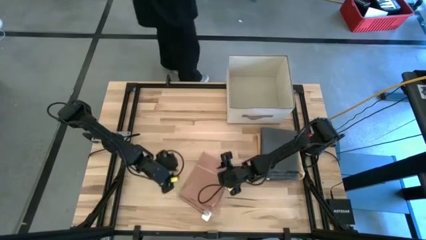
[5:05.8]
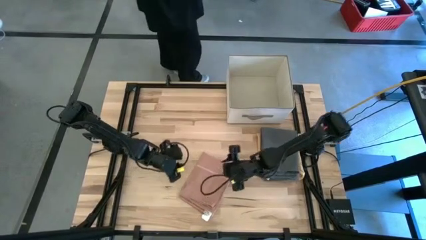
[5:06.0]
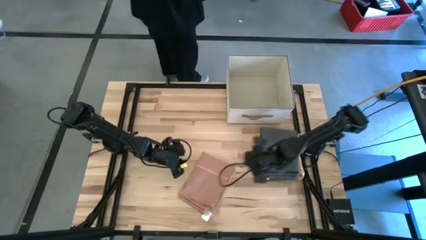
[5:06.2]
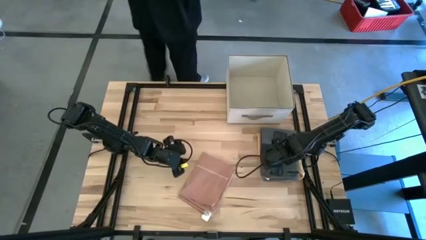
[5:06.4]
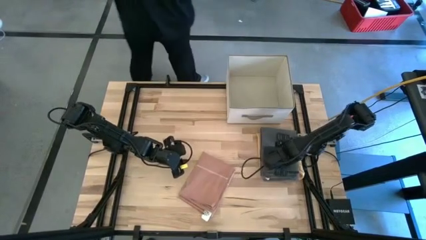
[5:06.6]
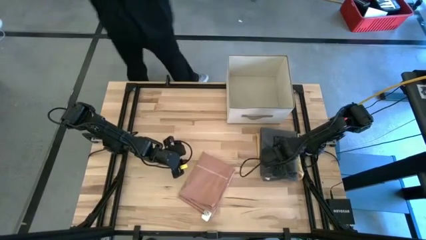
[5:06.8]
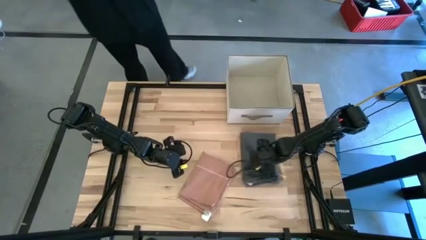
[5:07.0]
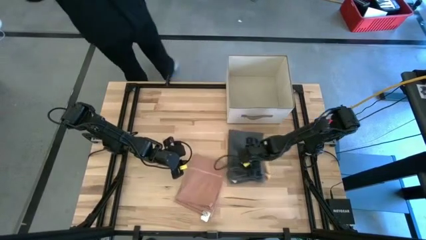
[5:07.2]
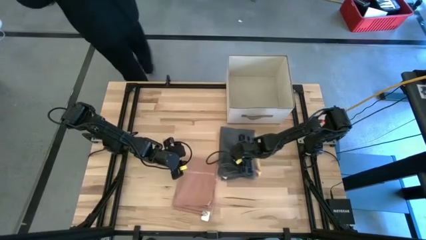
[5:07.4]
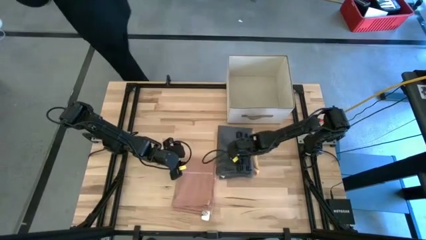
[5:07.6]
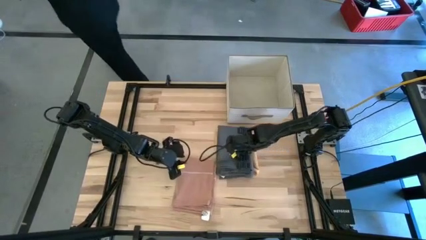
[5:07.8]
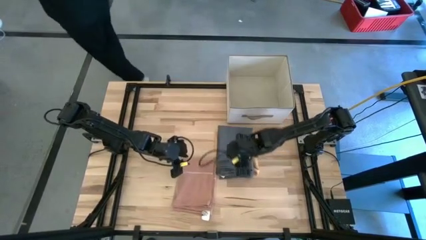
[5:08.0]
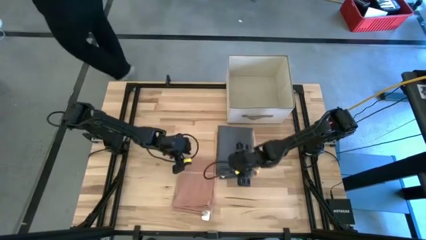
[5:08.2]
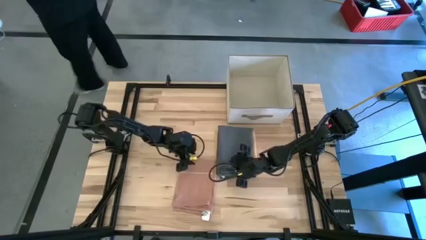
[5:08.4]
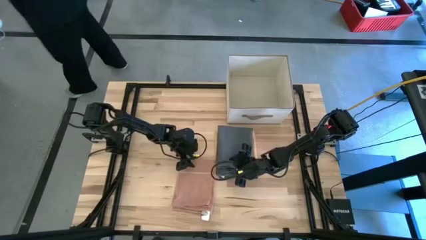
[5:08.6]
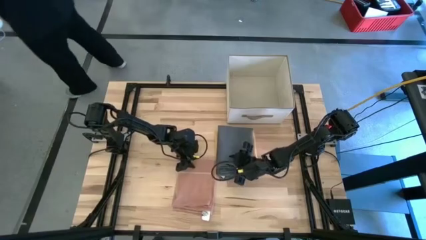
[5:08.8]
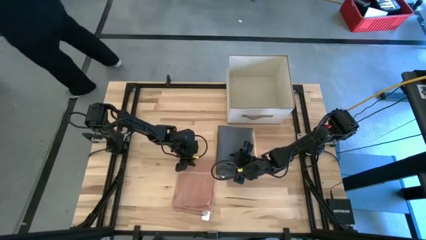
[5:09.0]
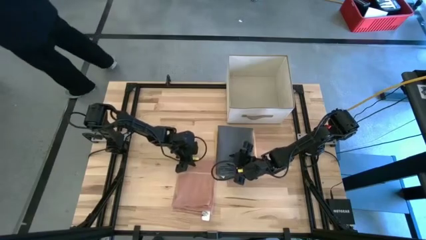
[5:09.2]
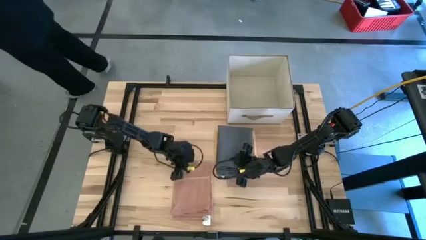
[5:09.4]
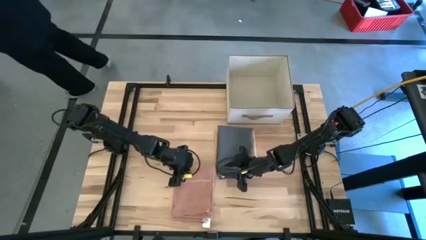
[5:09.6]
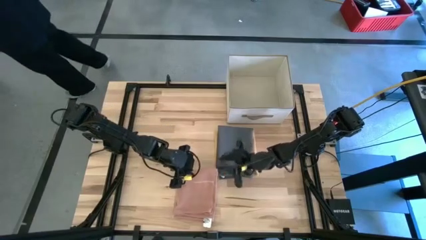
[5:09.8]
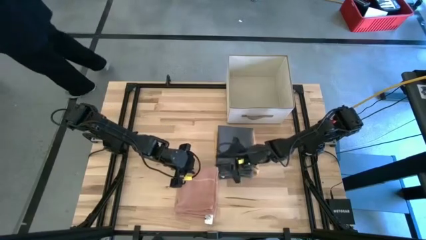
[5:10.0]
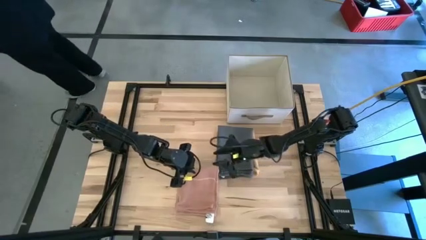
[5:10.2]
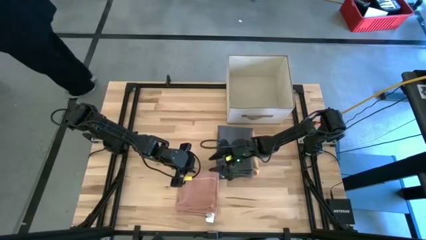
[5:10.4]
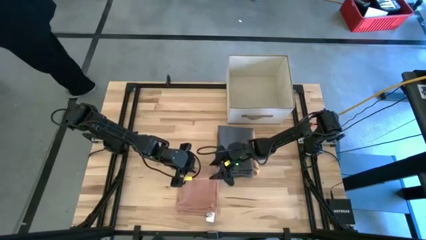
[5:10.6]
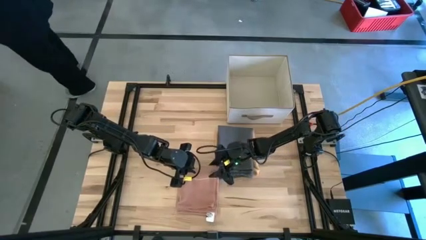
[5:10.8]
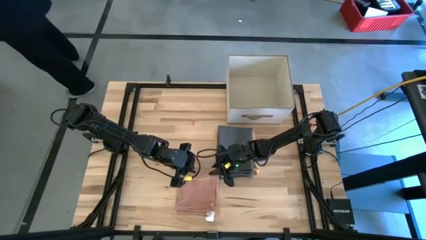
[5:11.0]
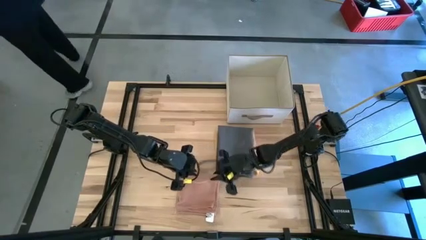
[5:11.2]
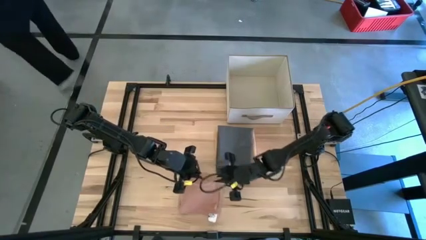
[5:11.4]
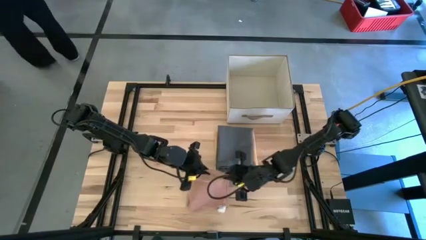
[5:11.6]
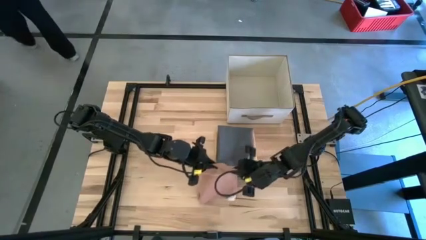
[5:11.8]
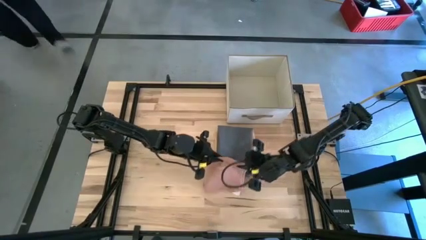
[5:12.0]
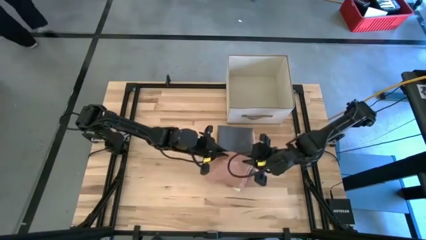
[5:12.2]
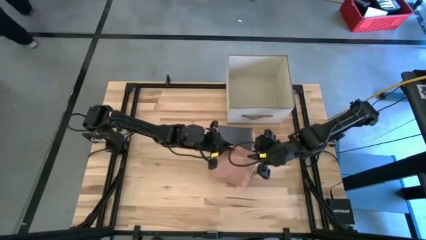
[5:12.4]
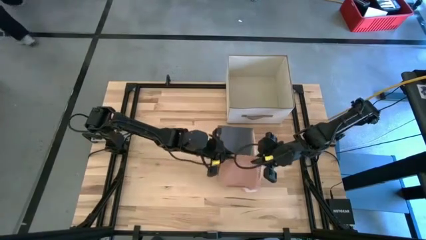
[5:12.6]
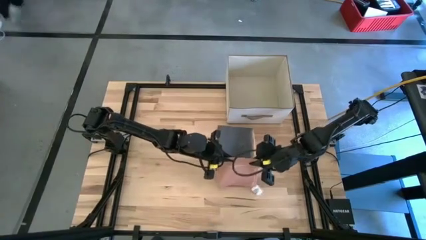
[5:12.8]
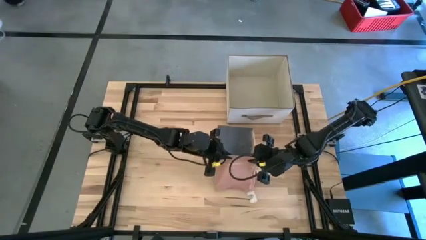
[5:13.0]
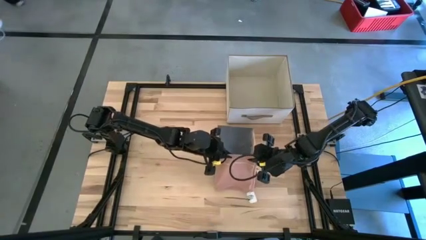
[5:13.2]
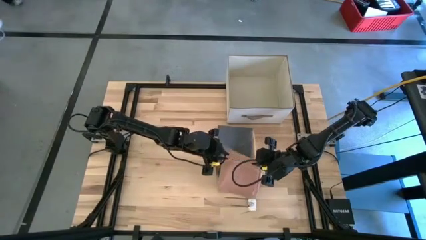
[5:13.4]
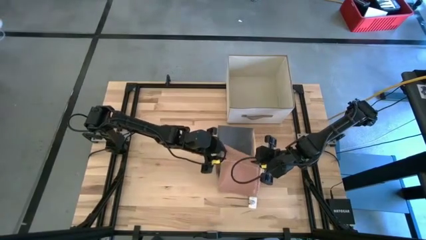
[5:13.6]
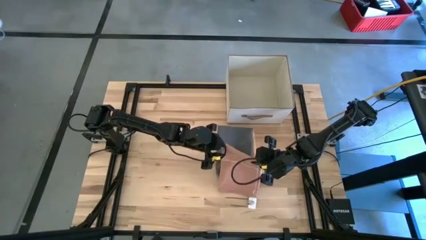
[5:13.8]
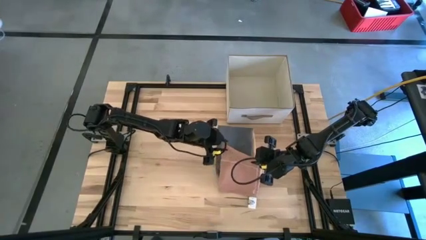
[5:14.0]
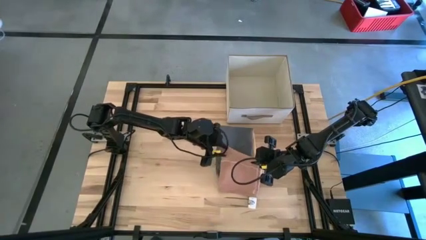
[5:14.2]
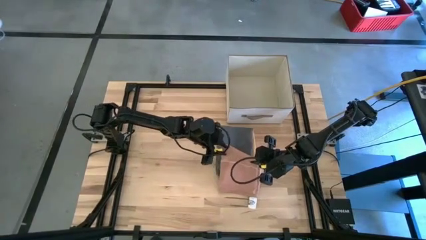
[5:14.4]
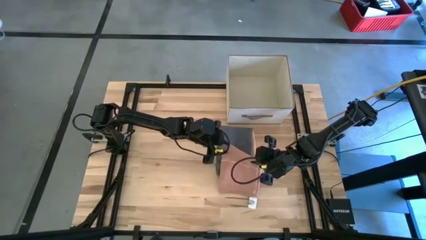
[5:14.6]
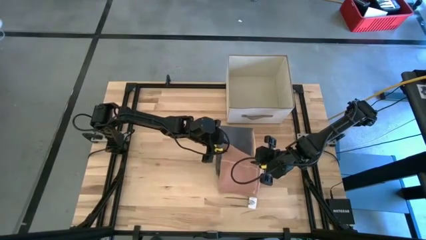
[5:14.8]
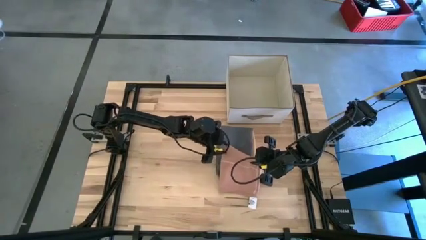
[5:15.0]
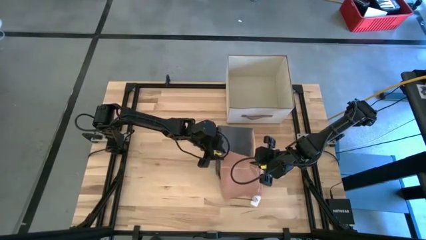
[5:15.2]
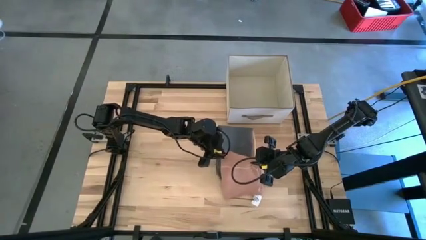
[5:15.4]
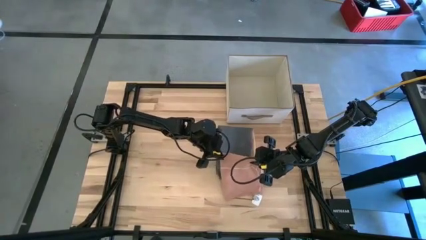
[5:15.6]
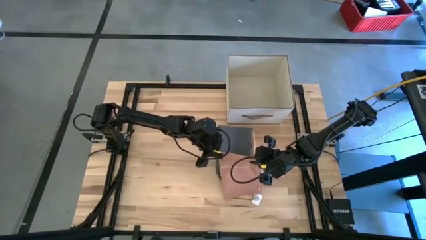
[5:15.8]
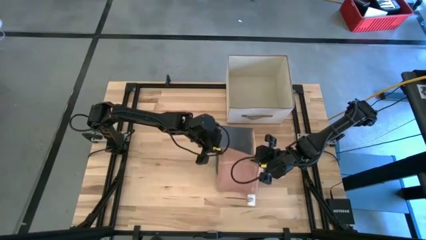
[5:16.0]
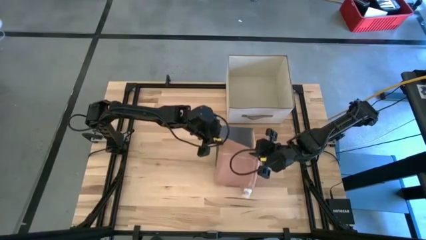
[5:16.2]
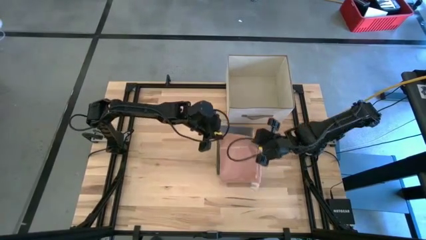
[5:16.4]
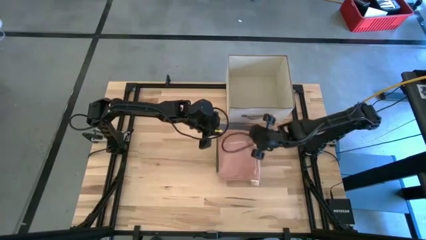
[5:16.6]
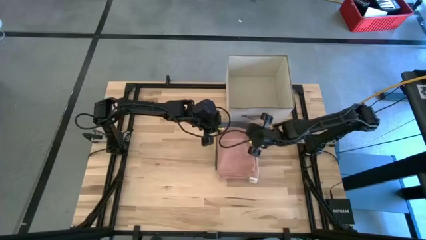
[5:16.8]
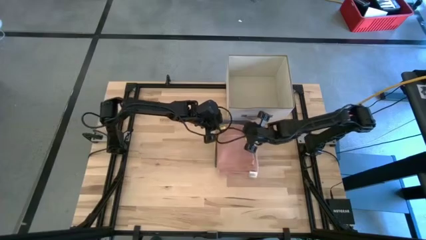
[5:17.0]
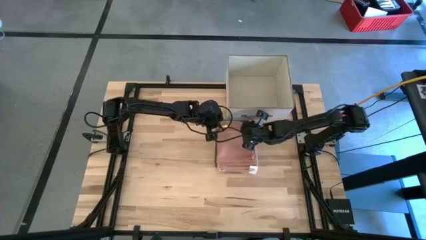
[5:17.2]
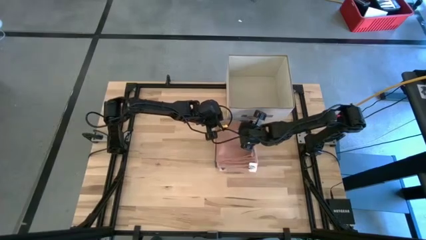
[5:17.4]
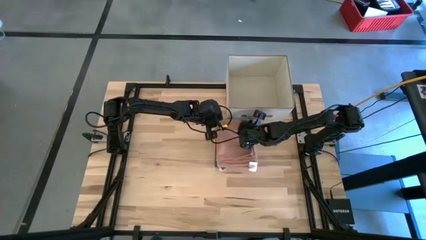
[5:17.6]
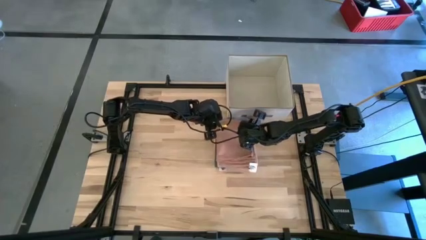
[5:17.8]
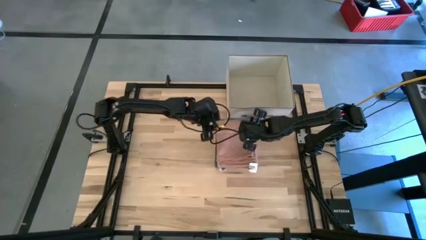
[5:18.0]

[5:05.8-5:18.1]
Task: Fold towel
Stack the brown towel on top of the gray towel on the table

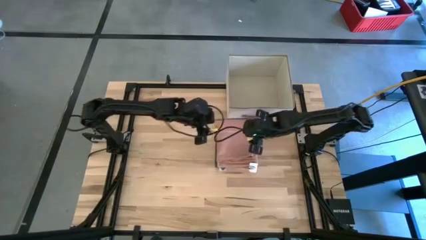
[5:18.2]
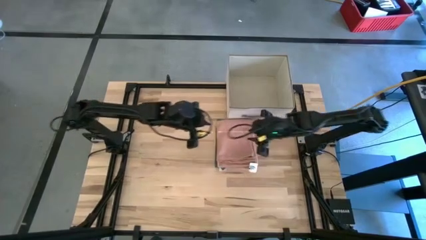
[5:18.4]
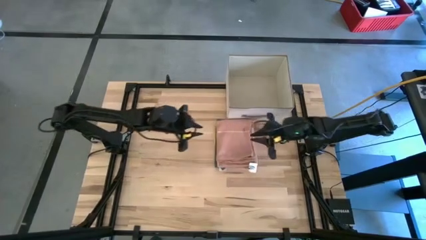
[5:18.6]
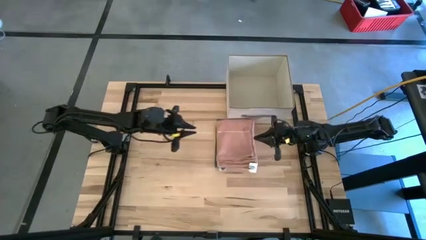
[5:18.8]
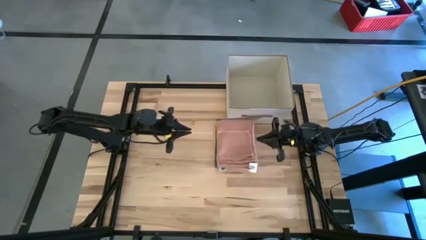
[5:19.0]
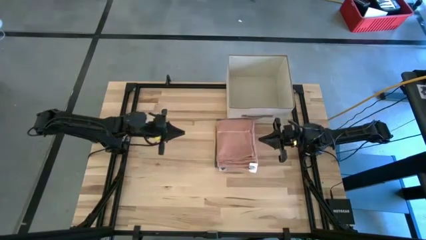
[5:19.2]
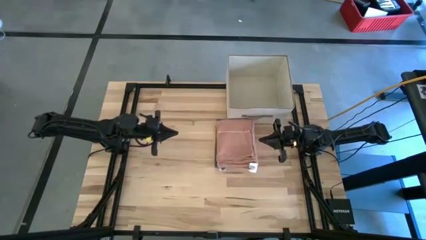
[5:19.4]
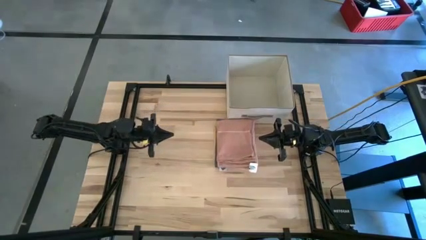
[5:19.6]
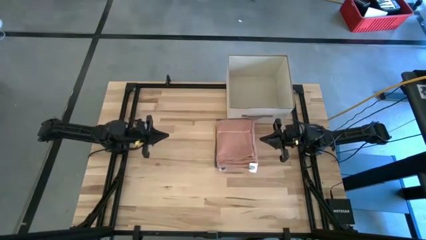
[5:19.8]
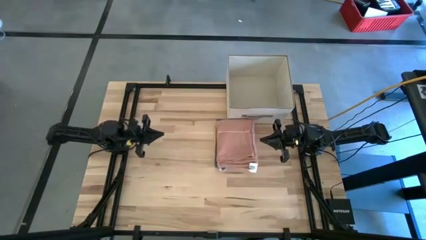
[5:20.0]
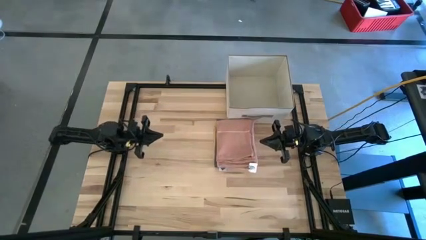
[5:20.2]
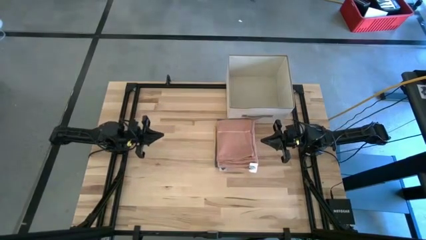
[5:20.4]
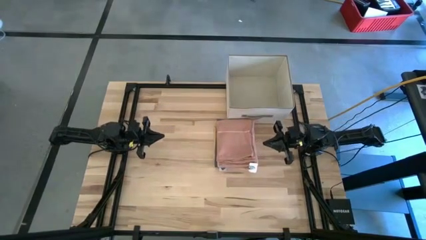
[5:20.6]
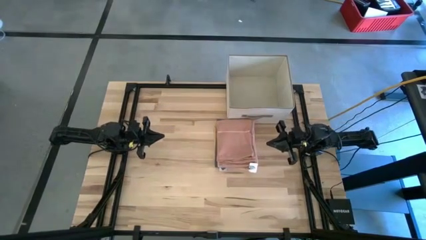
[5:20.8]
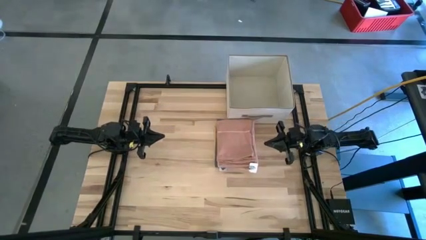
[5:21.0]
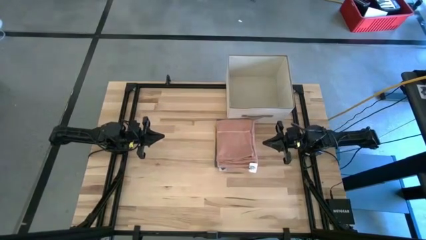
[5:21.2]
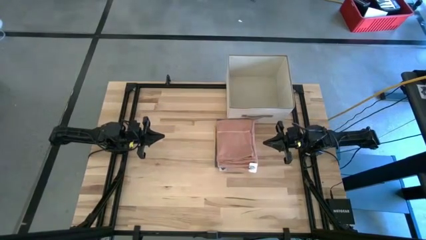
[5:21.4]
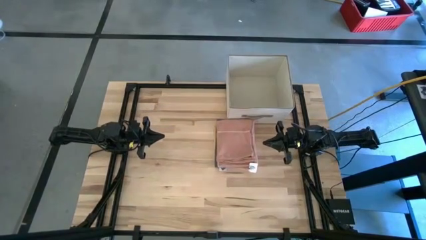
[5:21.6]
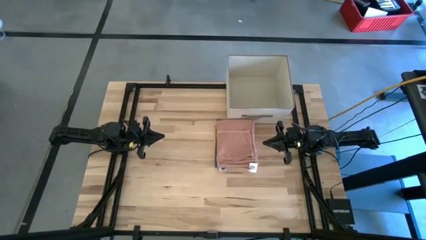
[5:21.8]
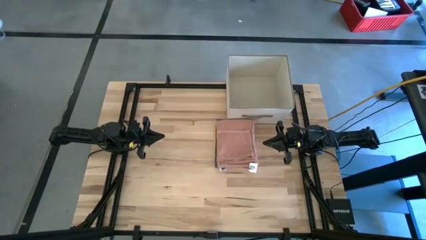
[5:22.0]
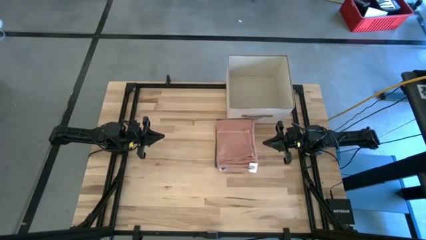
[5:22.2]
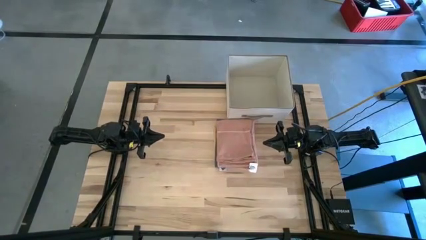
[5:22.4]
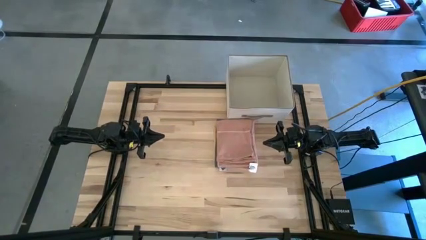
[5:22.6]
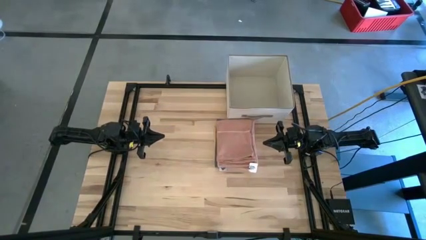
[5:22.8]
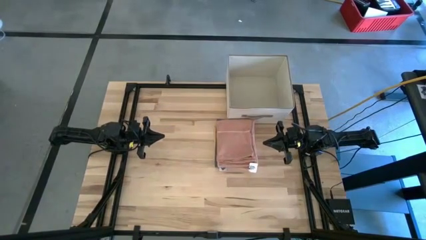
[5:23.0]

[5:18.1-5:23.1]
Return to Home Position

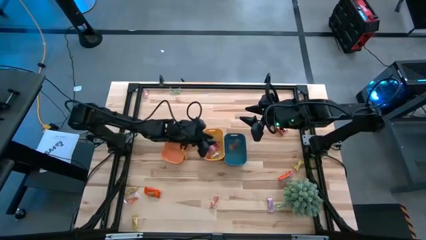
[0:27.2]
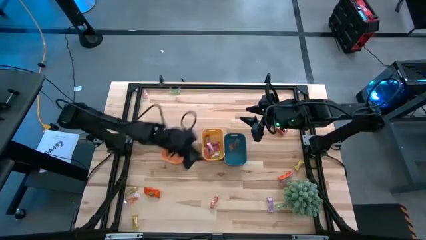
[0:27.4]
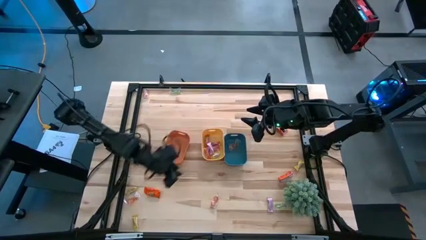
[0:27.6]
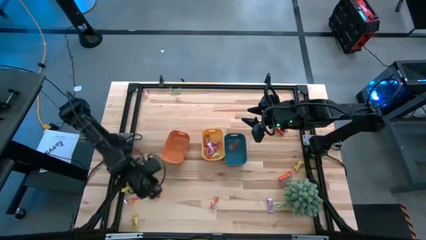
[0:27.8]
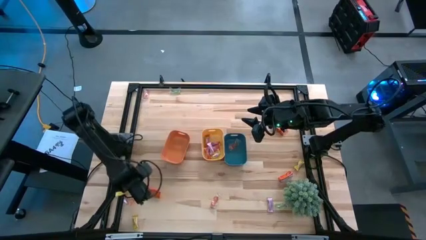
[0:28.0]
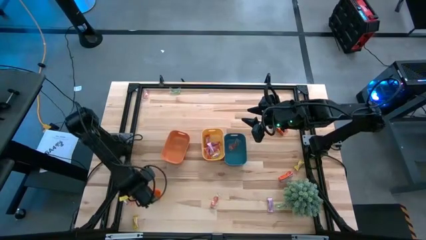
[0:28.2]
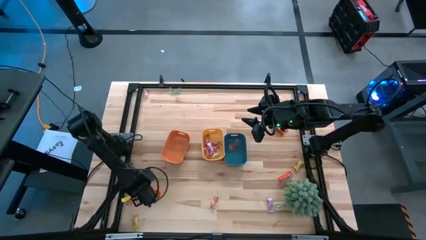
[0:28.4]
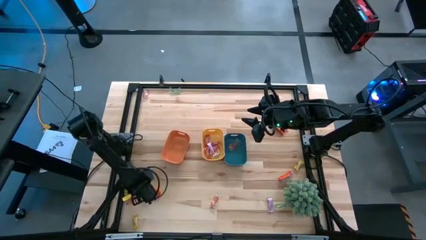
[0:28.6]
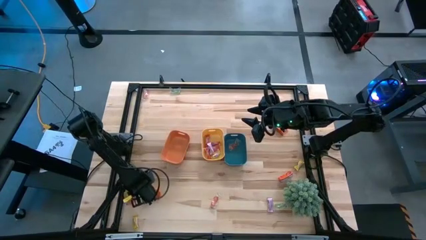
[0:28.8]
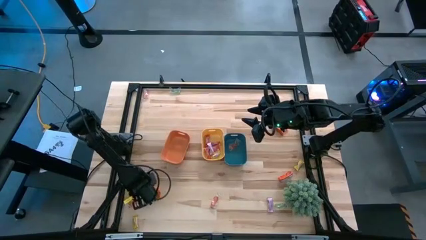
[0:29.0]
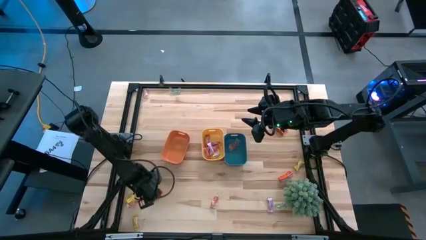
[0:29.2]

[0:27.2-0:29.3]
Task: Sort candy
Put the yellow candy into the yellow bin
